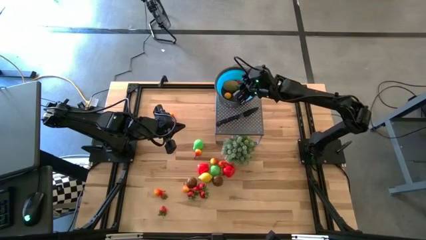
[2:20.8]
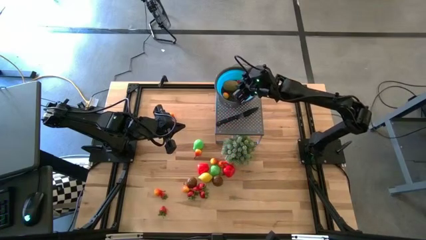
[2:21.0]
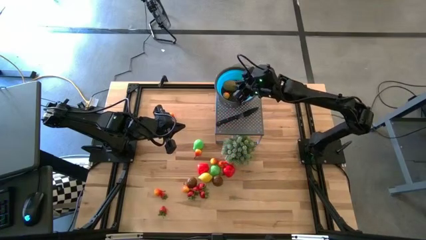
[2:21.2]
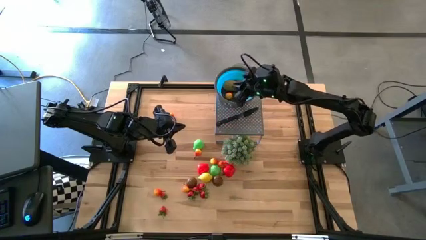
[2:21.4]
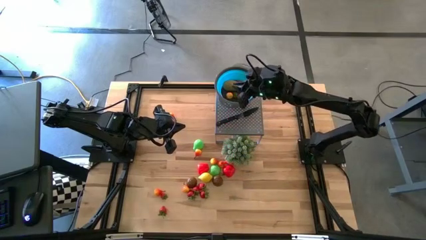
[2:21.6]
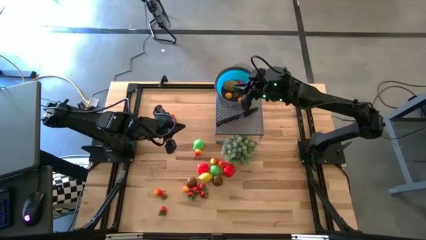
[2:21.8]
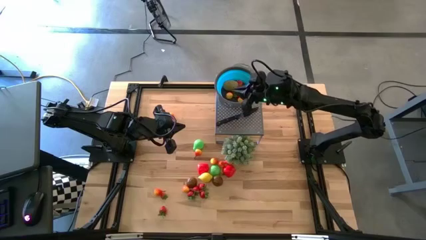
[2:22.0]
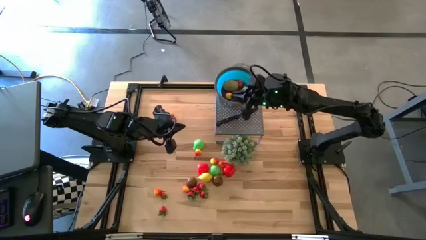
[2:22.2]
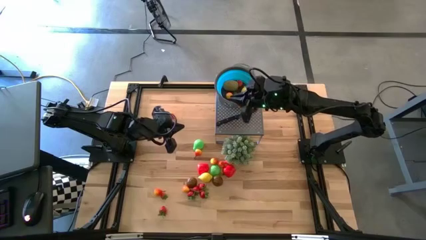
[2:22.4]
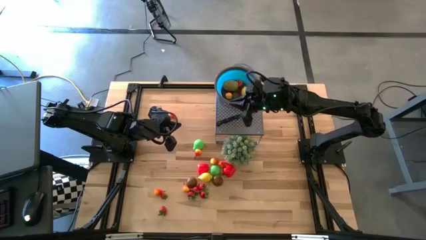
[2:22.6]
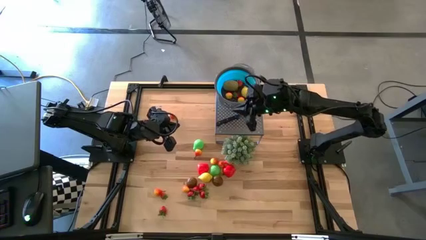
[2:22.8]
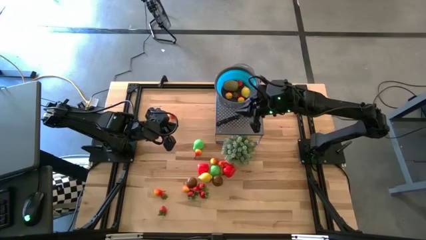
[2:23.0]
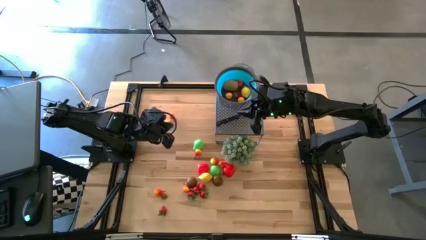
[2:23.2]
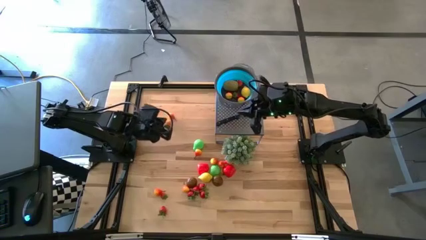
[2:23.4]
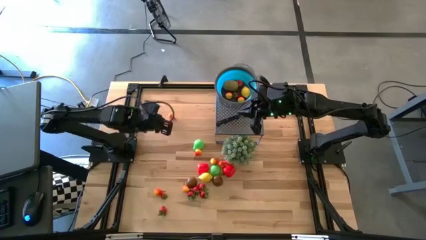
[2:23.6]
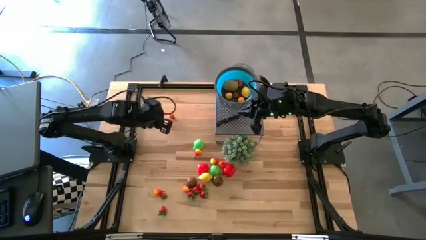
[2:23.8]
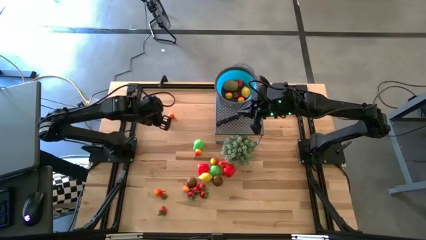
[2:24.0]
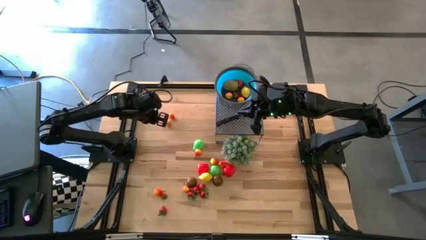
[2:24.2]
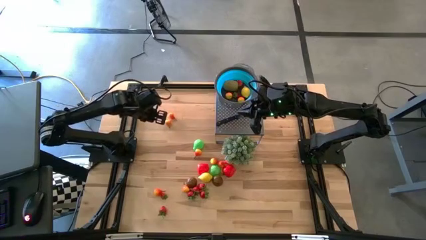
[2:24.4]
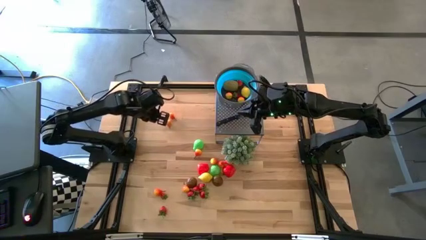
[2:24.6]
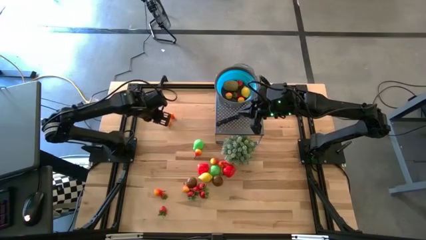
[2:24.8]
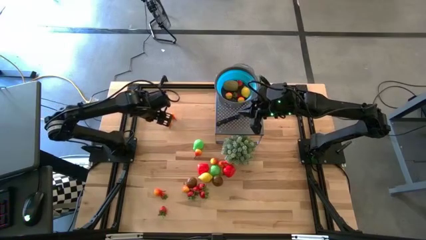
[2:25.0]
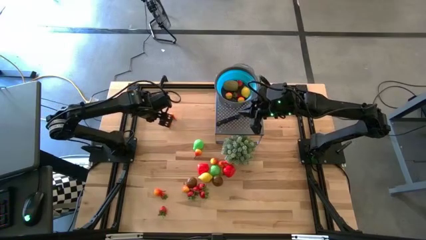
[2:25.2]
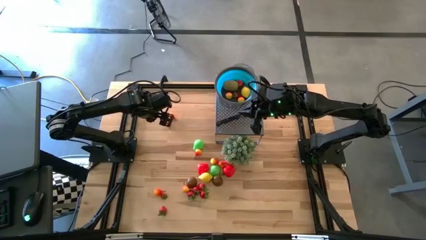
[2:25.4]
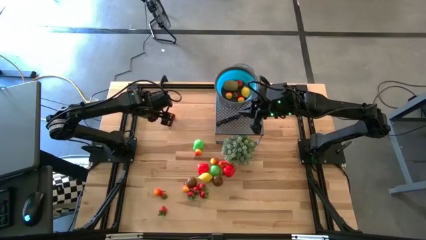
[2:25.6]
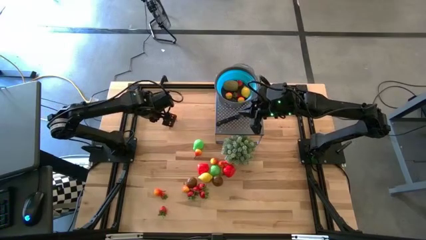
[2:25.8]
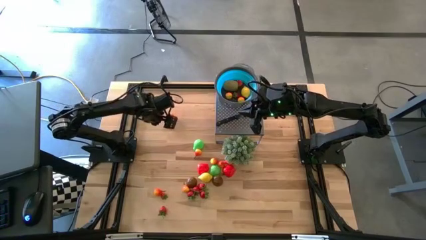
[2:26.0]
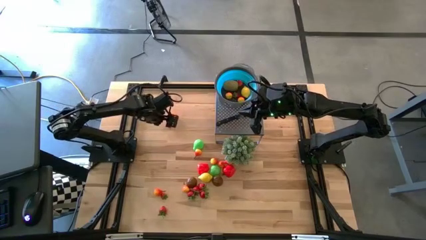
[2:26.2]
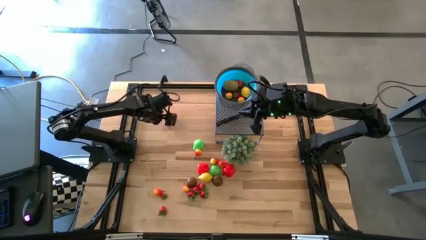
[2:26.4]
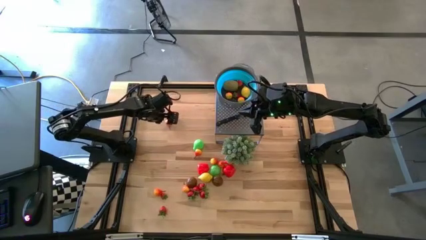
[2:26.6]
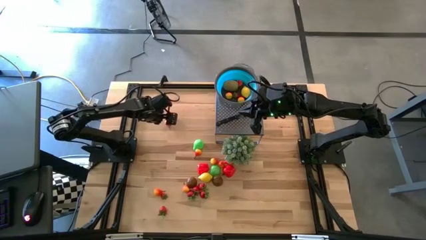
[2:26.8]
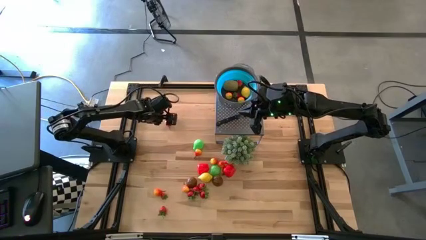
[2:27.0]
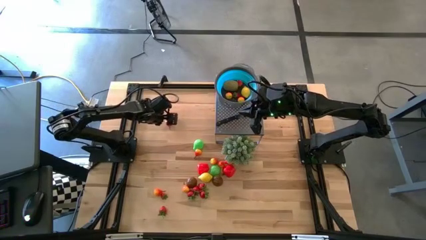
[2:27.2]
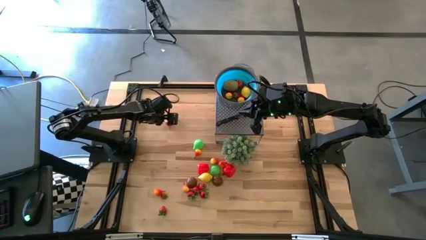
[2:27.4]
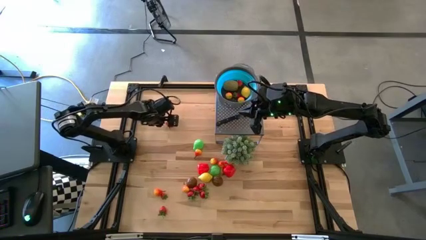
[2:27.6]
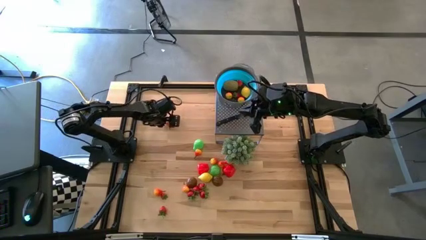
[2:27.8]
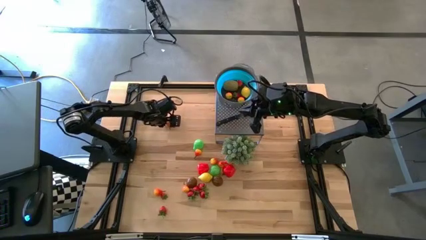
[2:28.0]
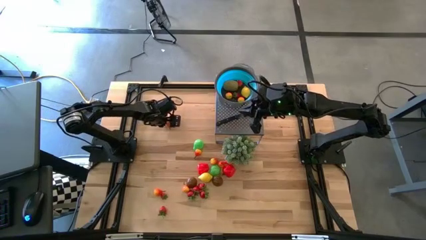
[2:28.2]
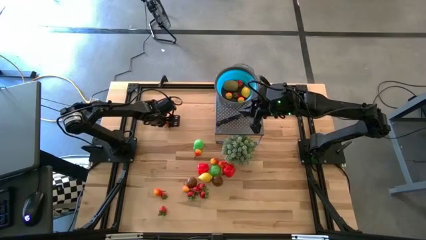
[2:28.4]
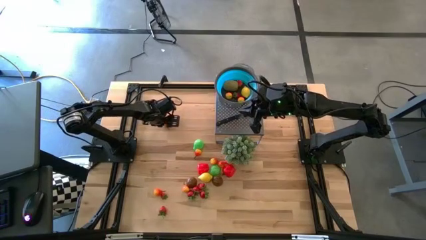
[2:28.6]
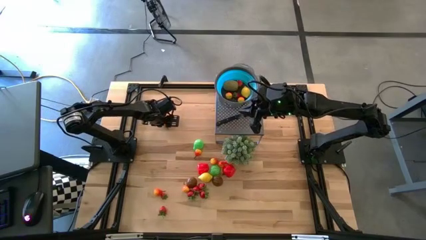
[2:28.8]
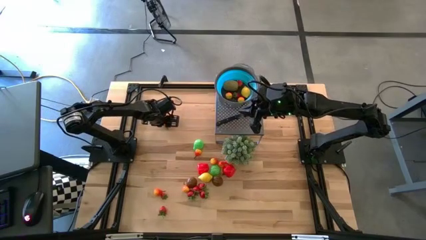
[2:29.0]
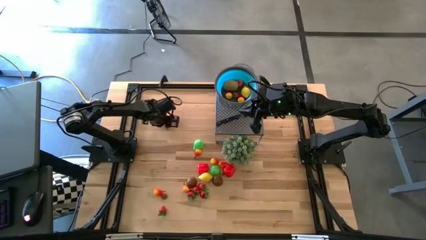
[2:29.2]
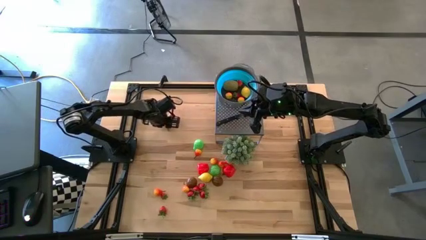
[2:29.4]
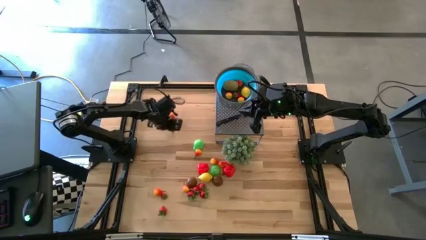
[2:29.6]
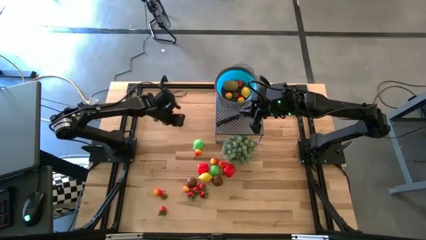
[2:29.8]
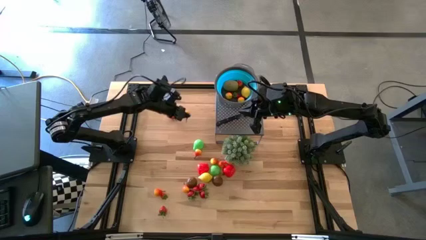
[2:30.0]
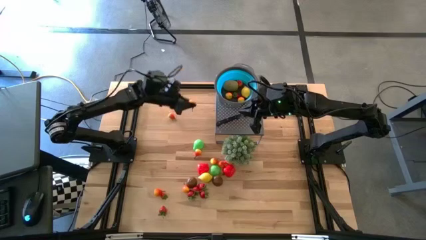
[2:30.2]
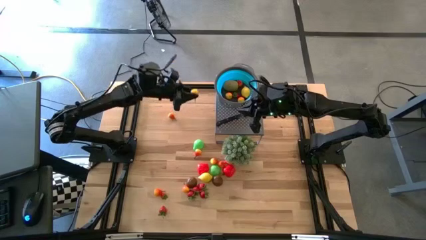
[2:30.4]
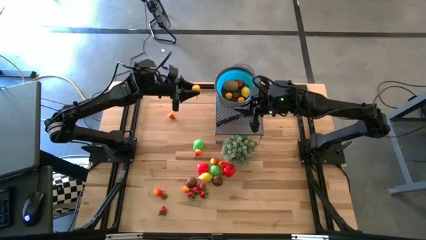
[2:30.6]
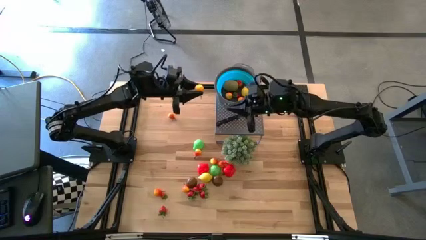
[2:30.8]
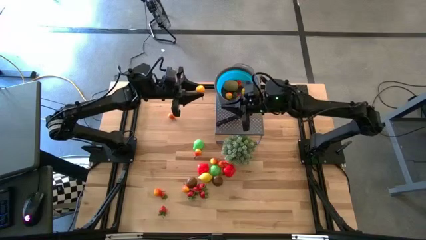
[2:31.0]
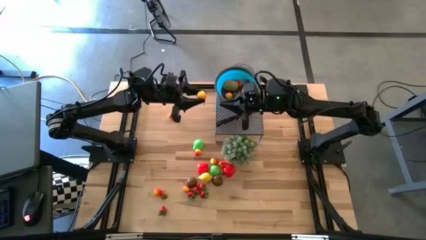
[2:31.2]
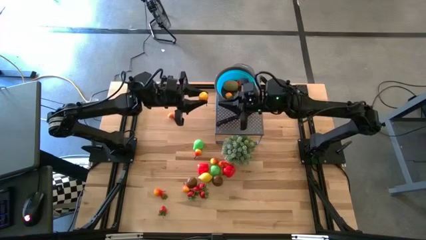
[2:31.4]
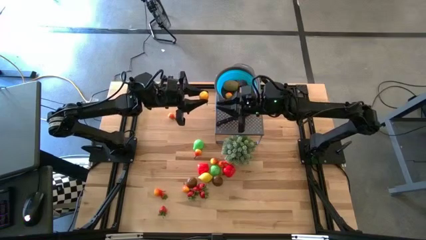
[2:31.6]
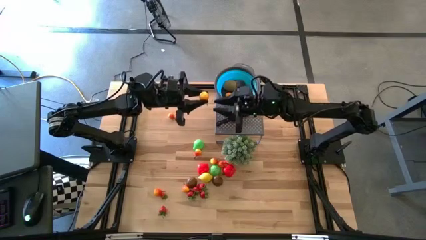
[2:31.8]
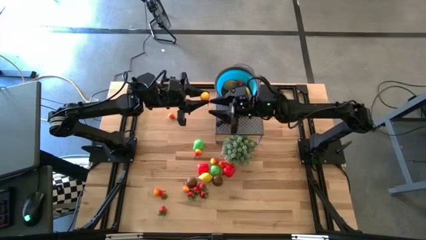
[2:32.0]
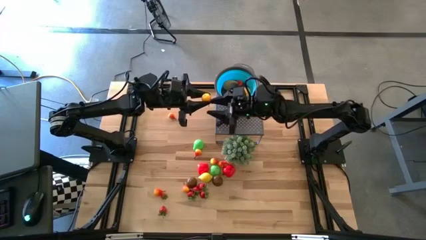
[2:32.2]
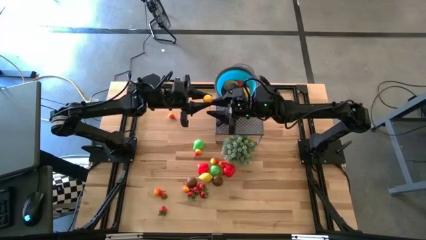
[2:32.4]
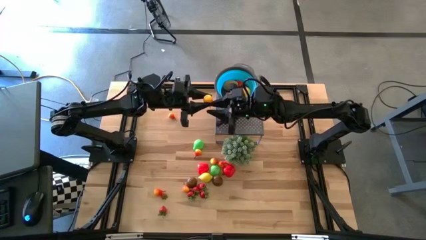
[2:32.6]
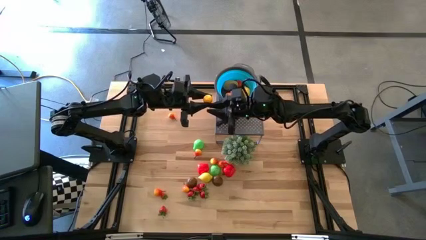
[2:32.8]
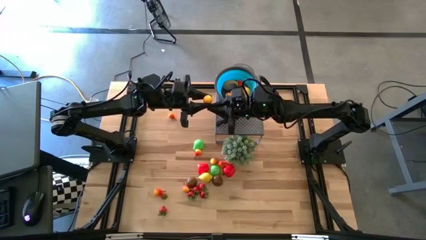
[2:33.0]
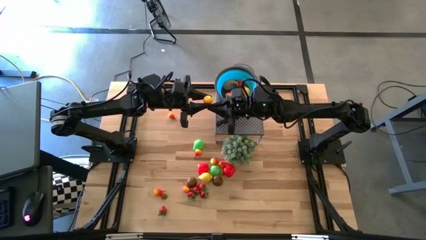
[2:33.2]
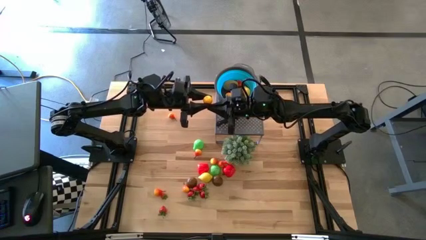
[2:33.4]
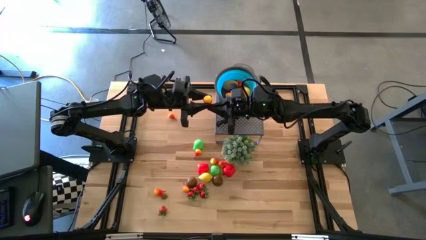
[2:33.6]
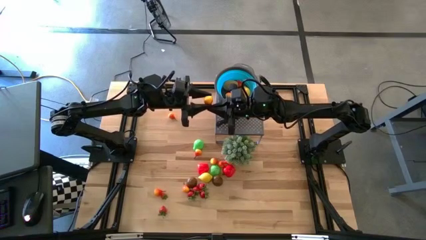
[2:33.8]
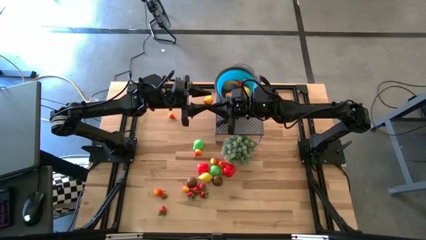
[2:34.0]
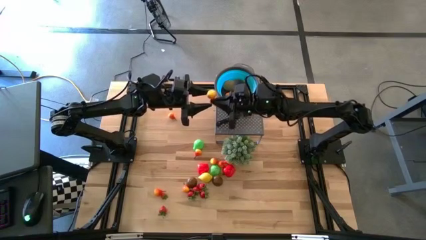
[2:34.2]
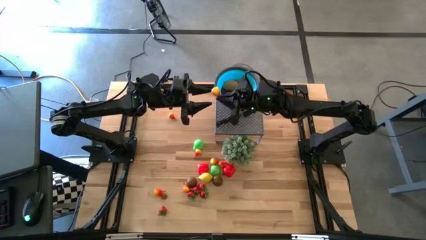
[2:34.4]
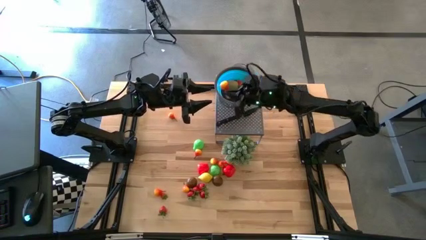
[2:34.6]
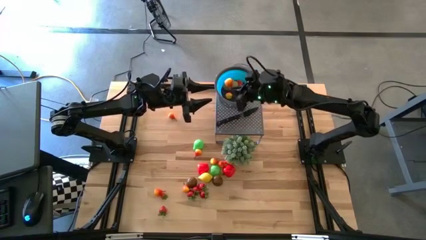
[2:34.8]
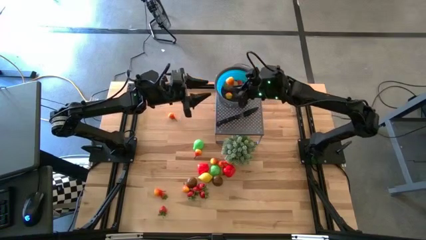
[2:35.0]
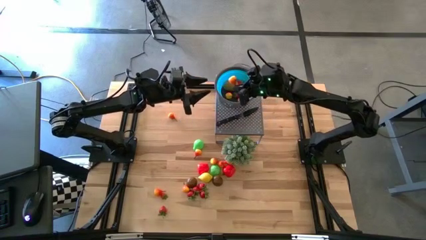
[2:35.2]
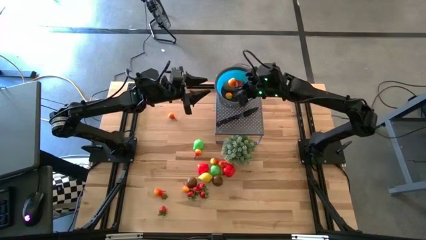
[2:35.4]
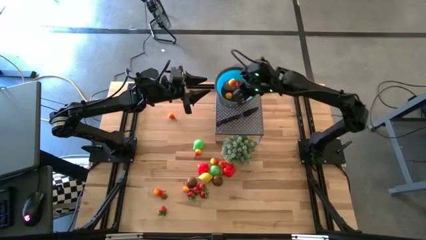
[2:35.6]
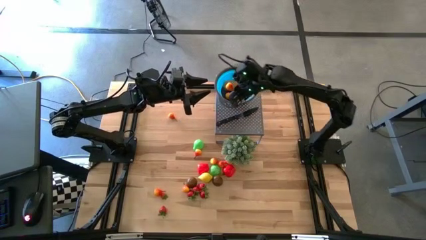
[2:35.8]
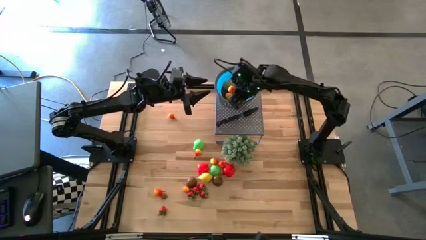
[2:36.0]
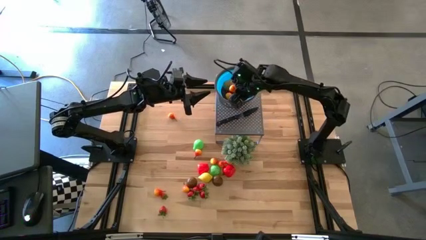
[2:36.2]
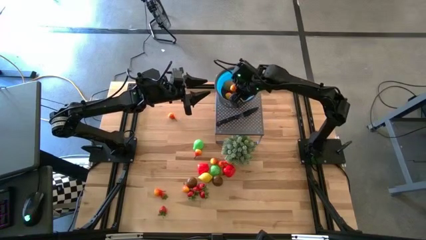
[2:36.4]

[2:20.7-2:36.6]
Task: Pick & Place Fruit
Put the orange pear into the blue strainer bowl

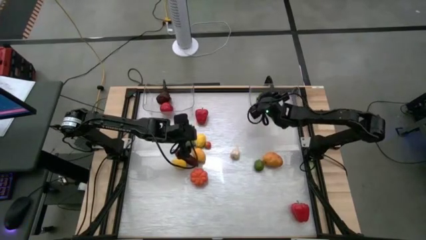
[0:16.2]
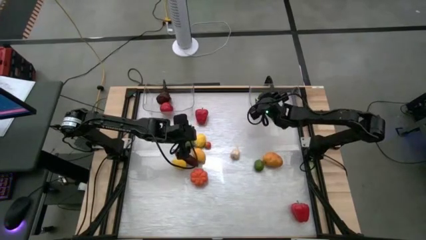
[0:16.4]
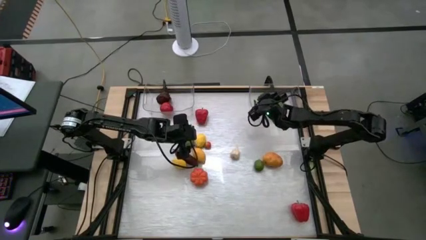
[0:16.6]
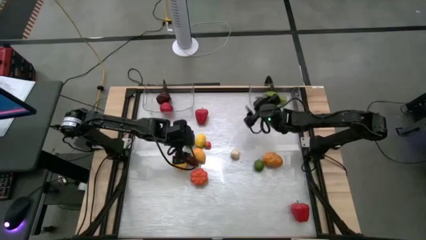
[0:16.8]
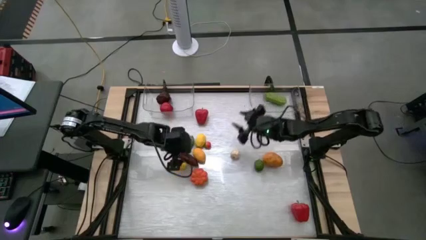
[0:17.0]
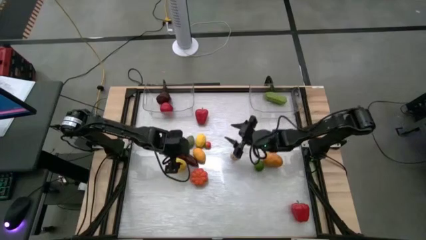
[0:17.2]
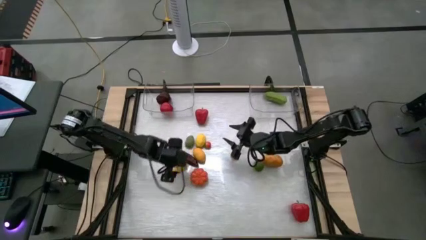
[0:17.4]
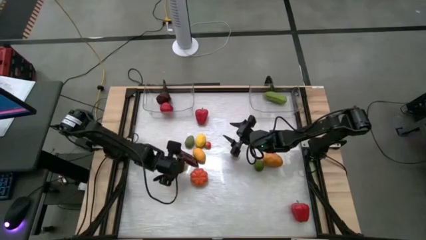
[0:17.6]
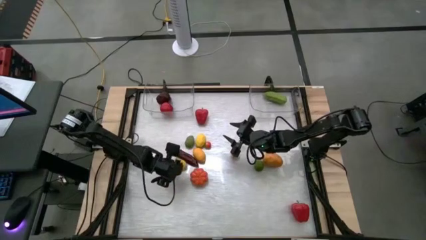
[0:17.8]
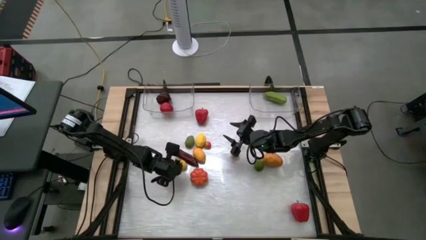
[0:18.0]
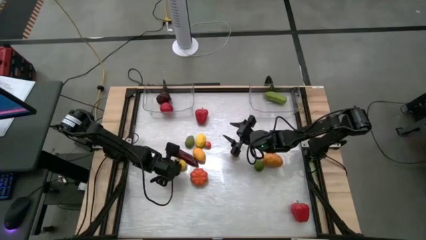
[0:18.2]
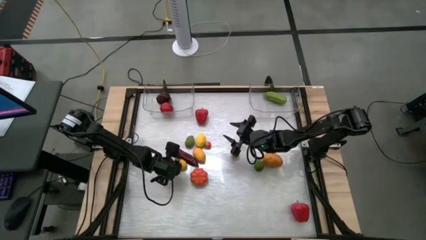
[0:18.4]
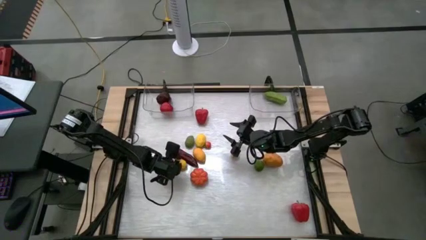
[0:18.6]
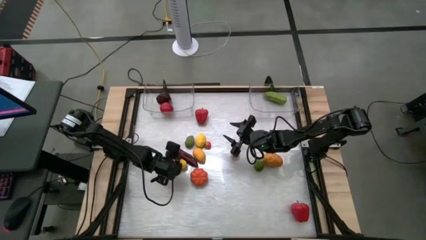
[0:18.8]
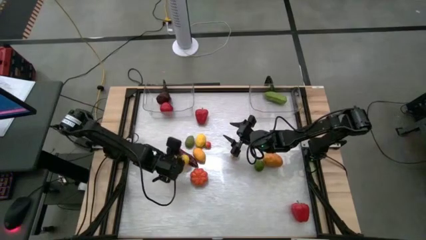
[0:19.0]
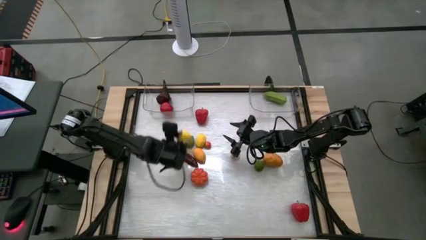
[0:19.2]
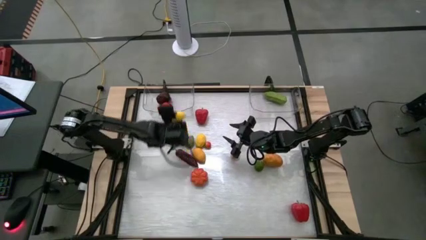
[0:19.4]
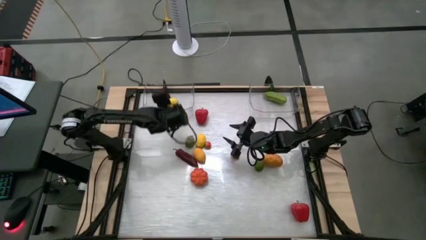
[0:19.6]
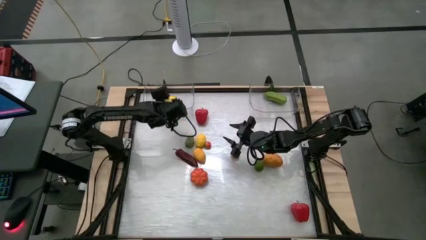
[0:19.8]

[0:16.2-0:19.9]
Task: Sort produce into baskets
Put the left yellow lemon into the left transparent bin
